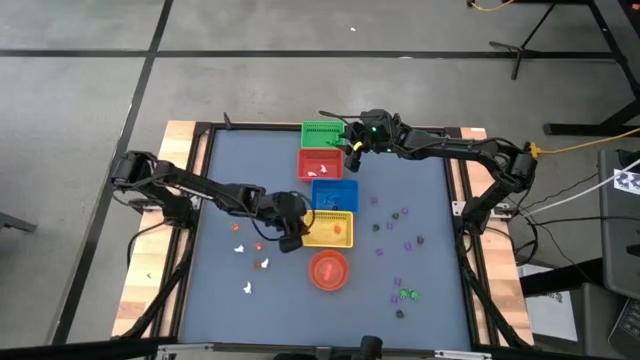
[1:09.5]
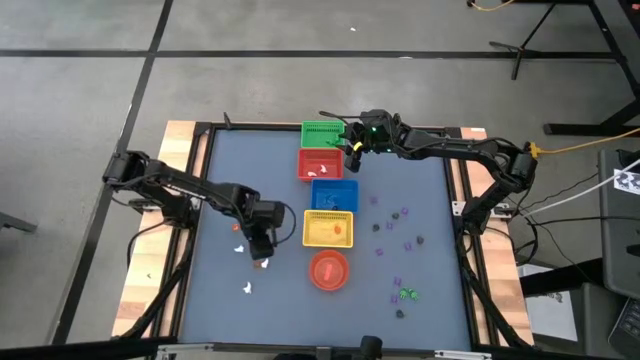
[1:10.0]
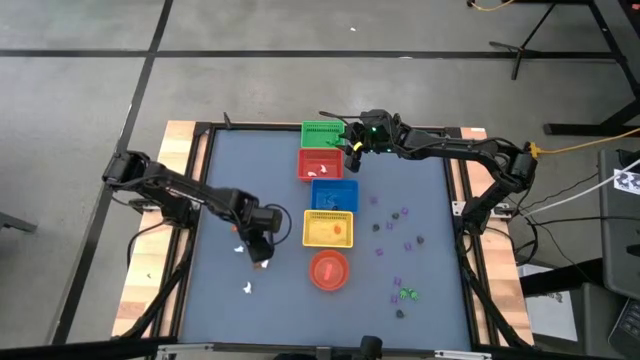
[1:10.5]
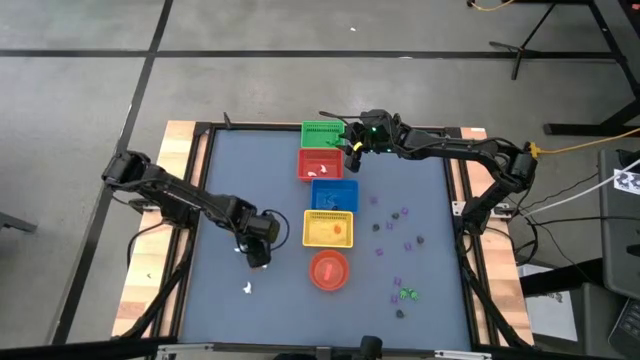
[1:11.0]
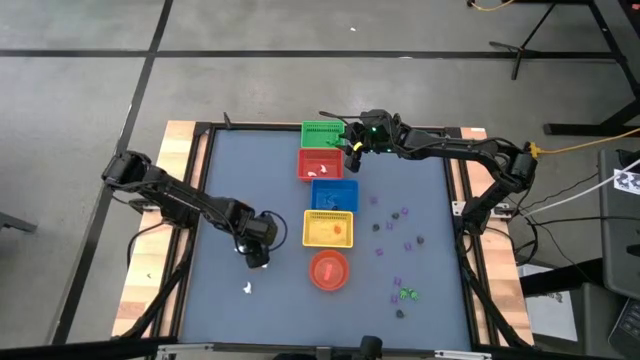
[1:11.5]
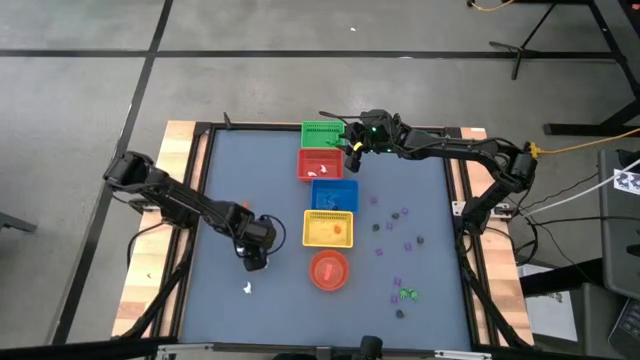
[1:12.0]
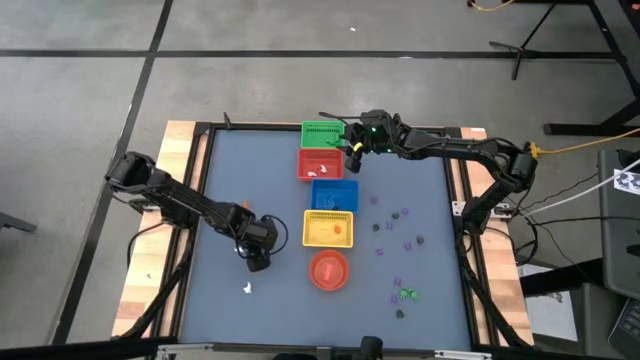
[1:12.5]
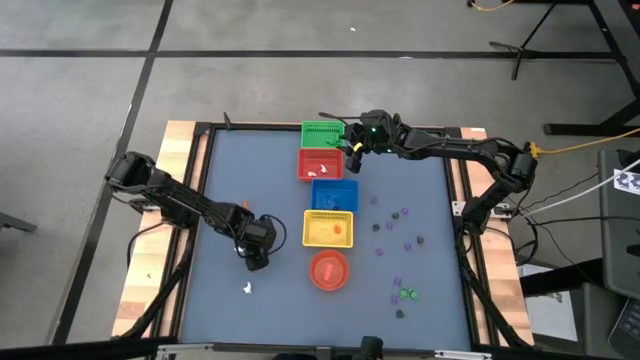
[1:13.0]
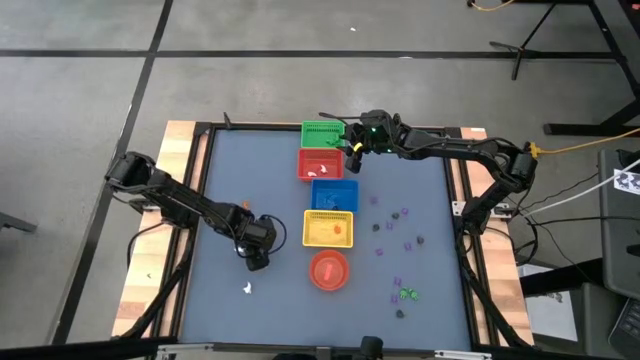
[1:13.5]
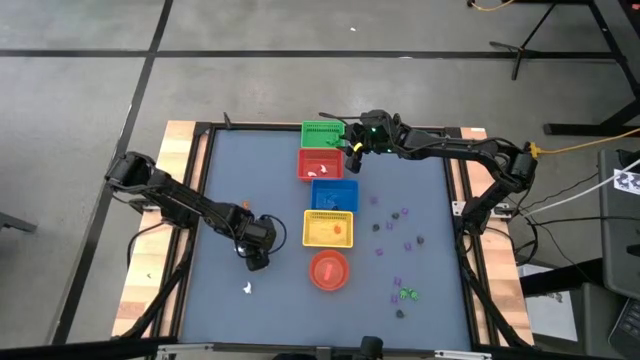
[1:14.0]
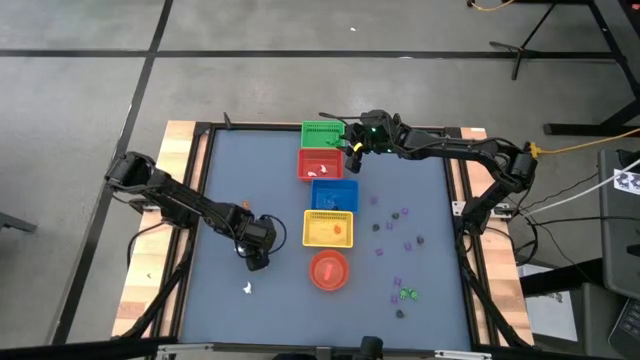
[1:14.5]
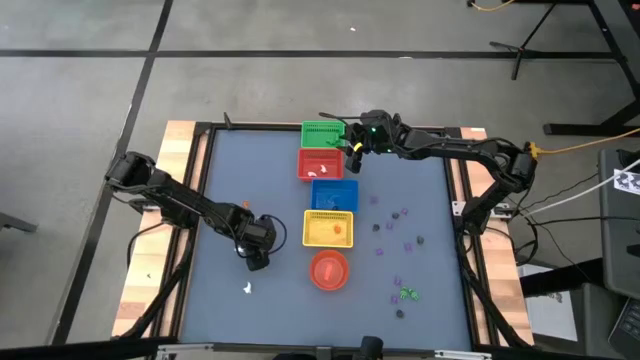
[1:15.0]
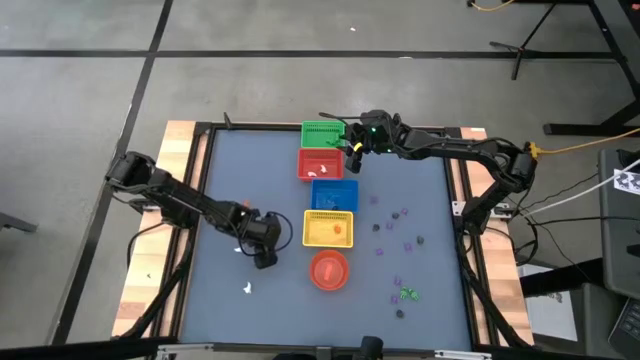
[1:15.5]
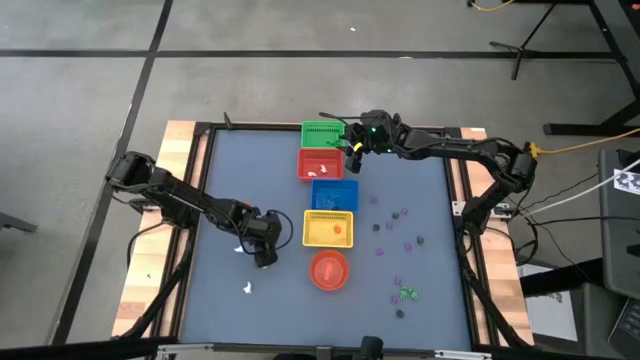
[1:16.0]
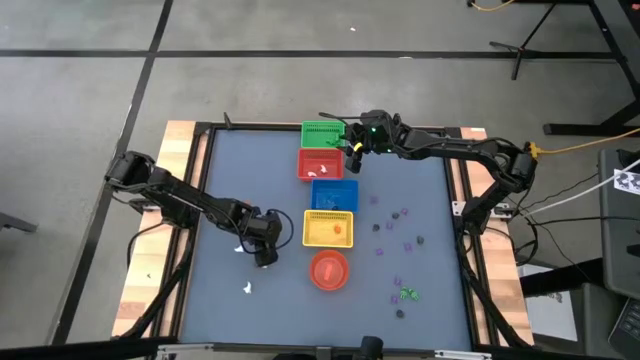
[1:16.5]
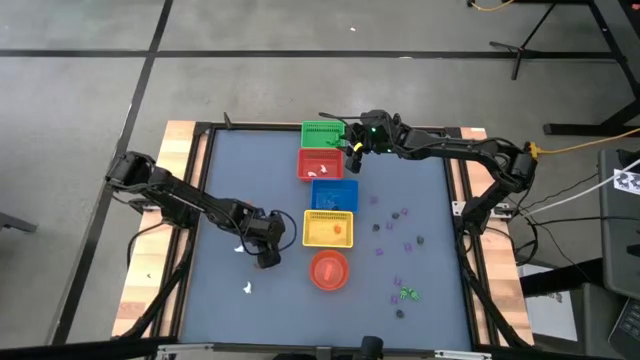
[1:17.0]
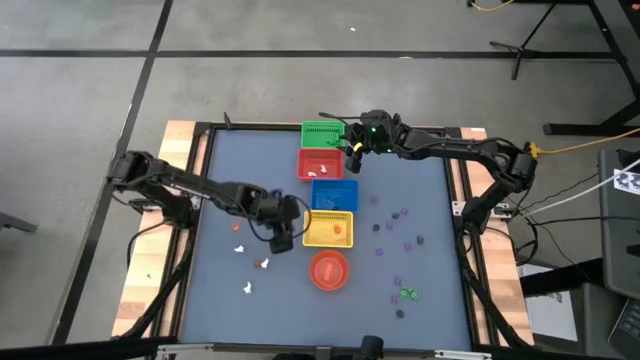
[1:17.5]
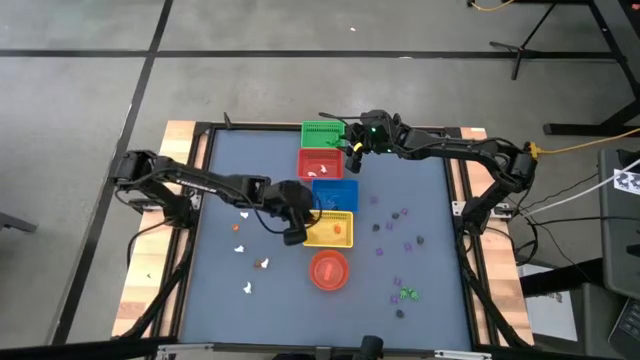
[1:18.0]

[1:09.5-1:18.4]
Task: Sort Halloween decoration
Put the orange pumpkin toy into the yellow bin

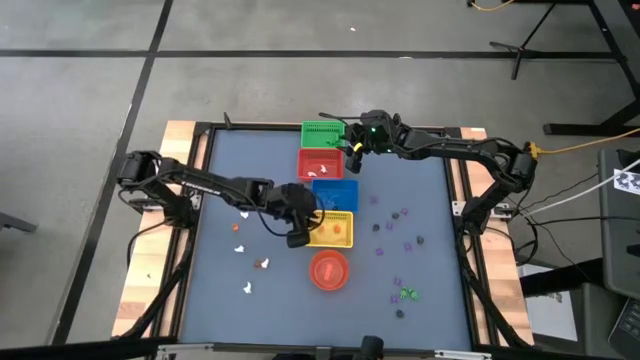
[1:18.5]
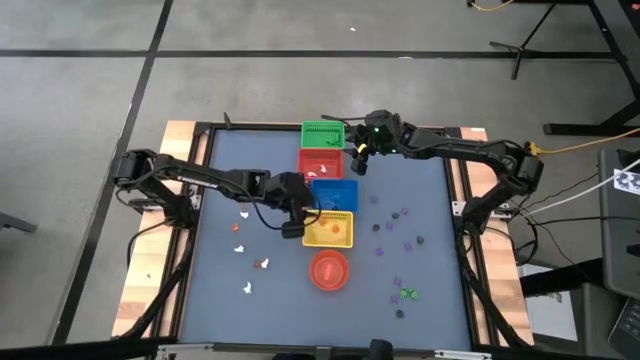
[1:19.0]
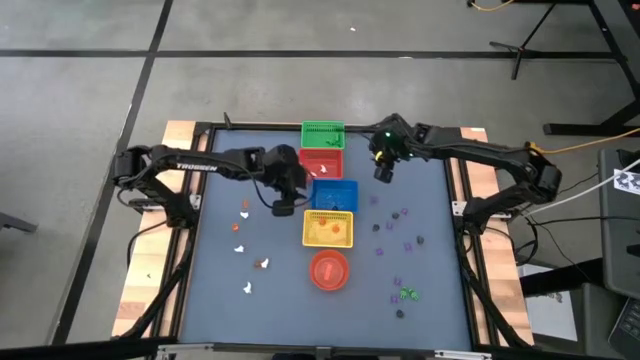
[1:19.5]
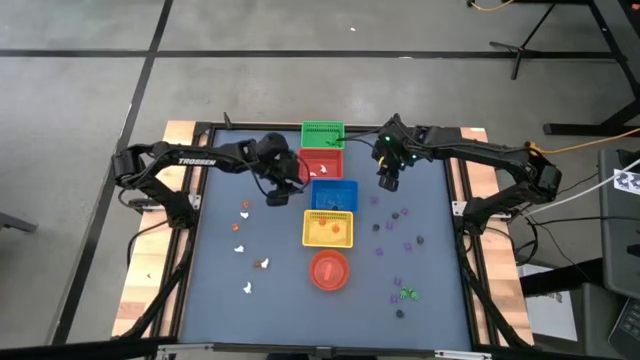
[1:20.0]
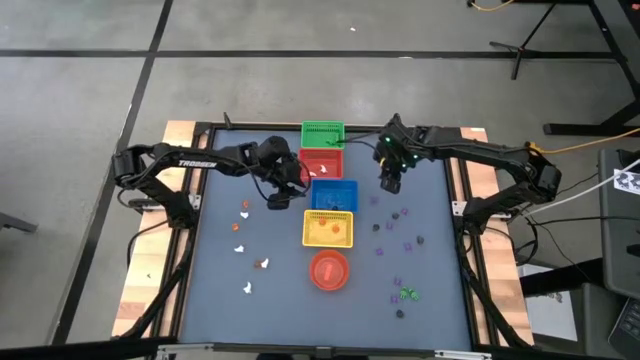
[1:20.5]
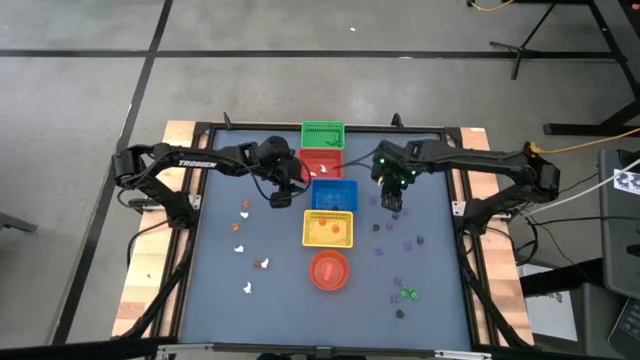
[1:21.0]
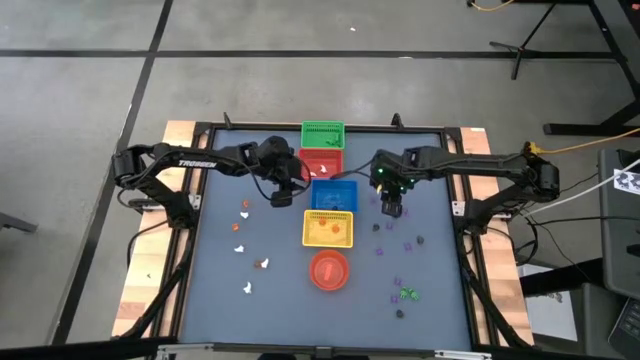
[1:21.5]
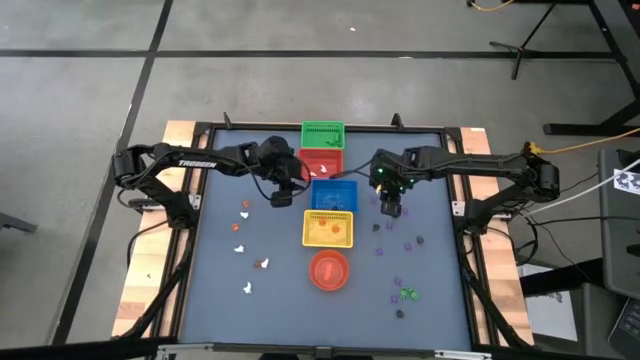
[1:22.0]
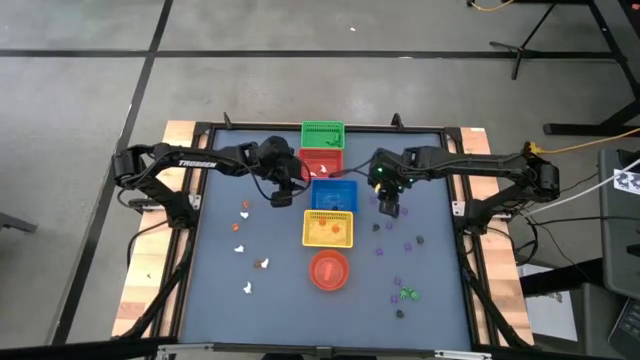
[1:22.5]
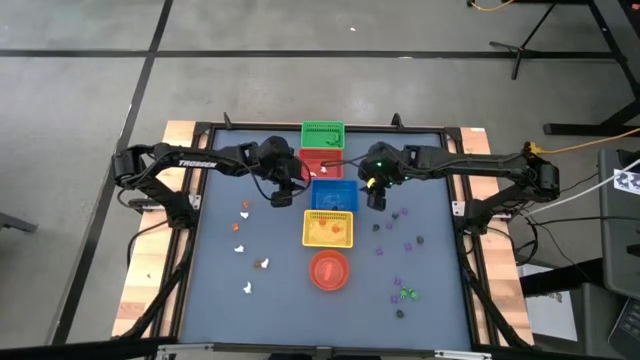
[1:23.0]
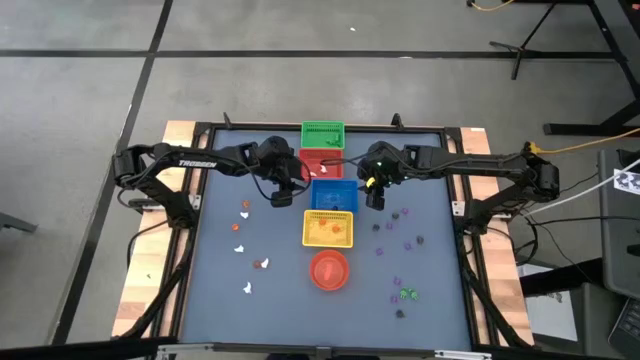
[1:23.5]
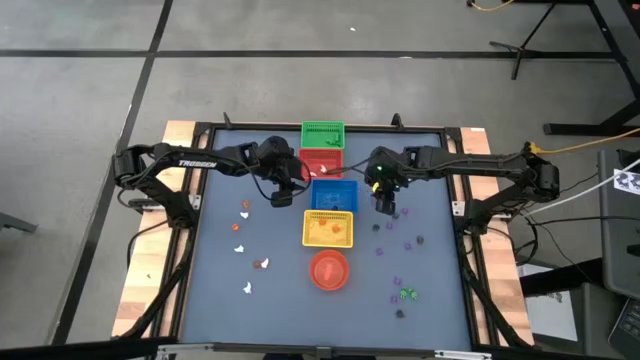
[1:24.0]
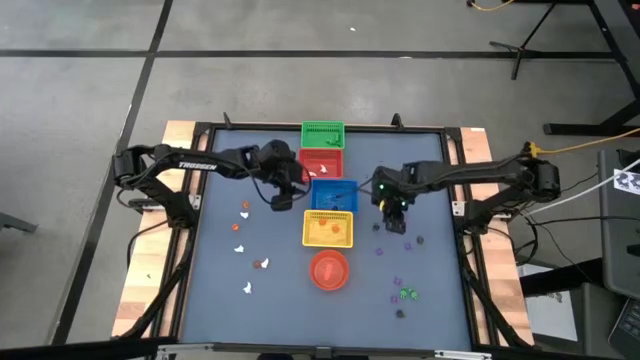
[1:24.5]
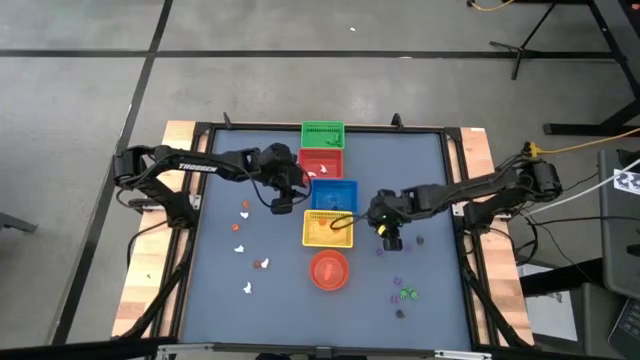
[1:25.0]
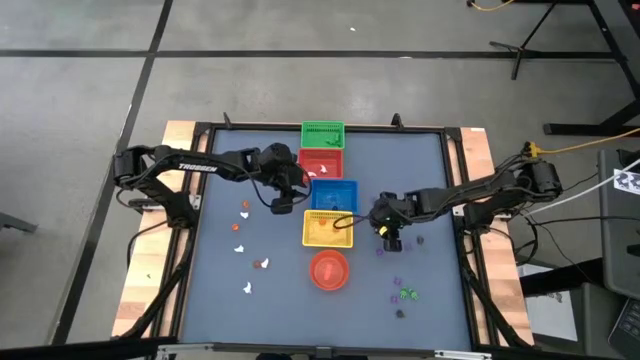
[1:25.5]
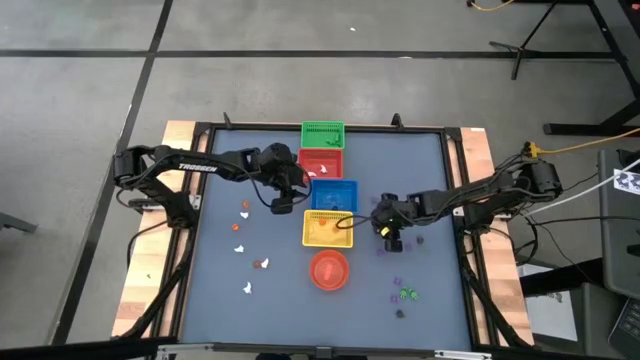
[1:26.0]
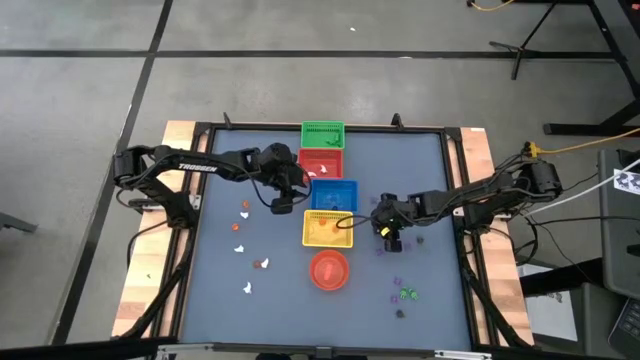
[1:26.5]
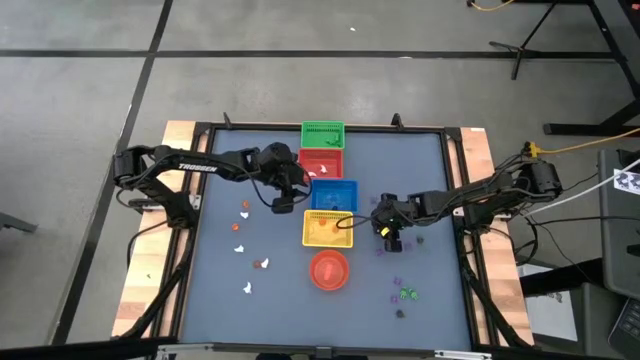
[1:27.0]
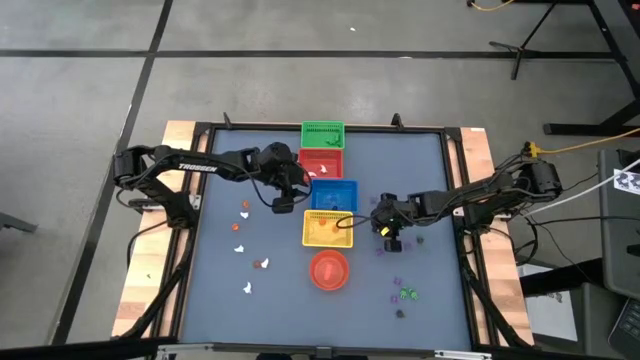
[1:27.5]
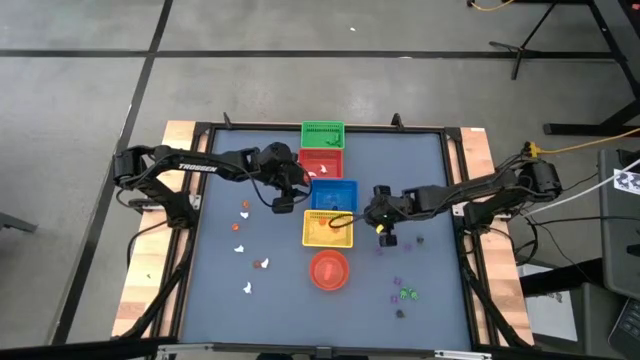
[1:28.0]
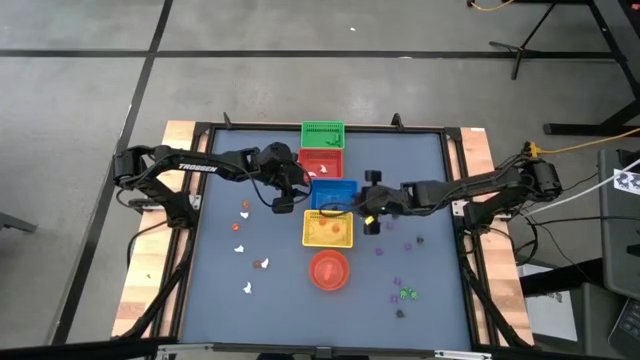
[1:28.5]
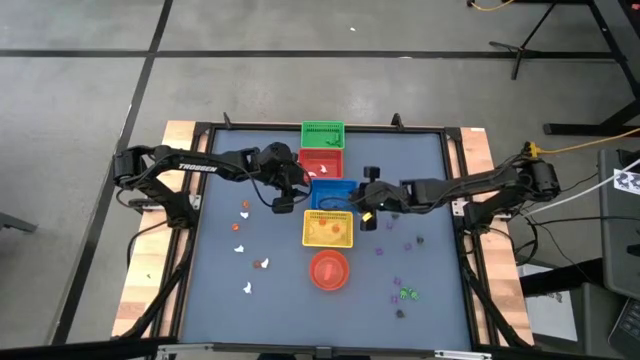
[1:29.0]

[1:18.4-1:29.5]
Put the black skull toy into the blue bin

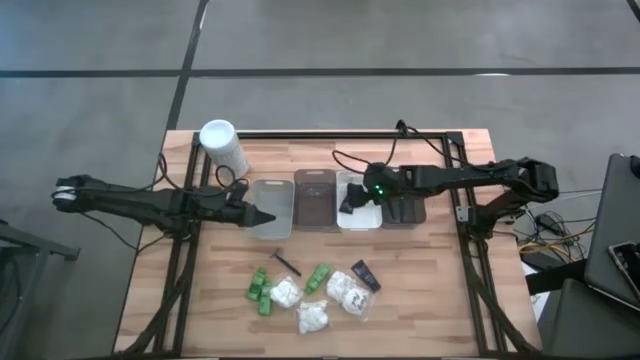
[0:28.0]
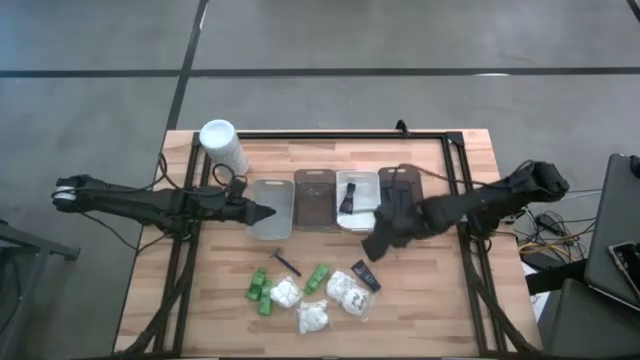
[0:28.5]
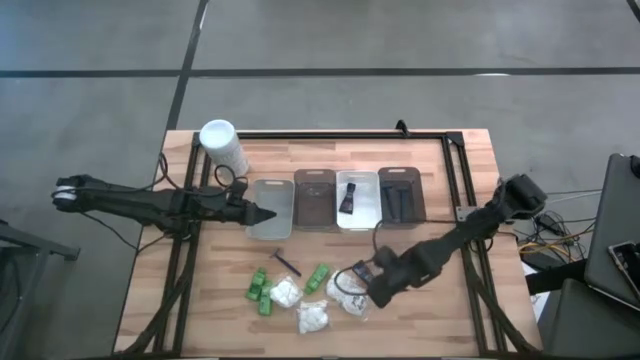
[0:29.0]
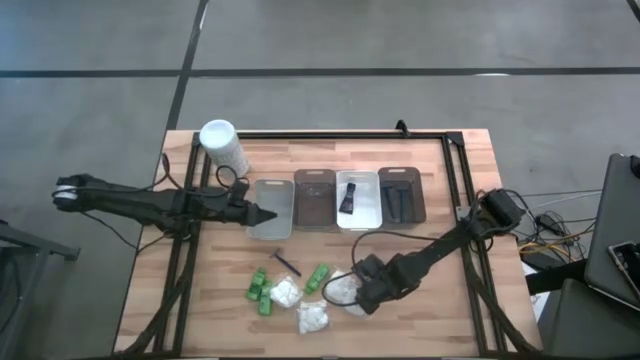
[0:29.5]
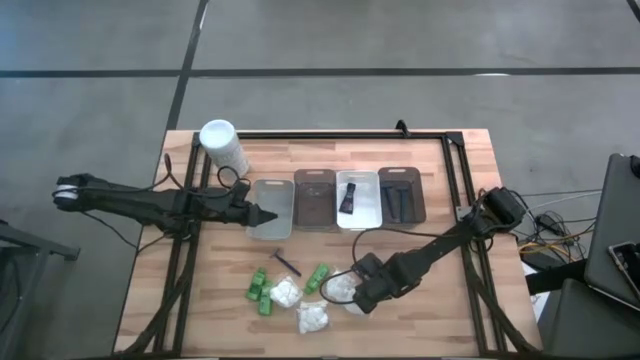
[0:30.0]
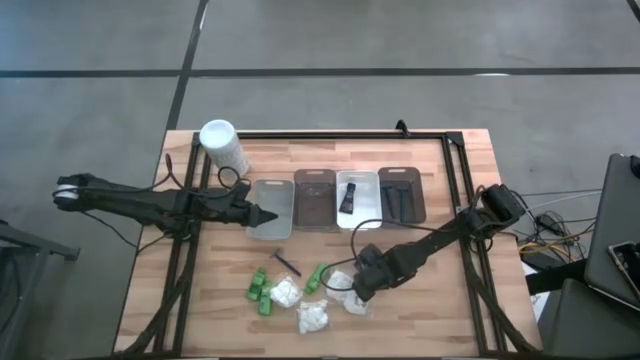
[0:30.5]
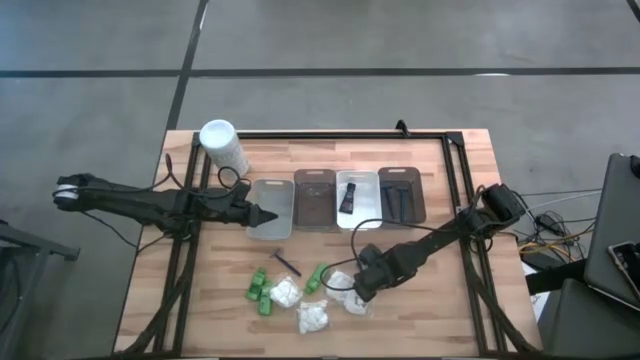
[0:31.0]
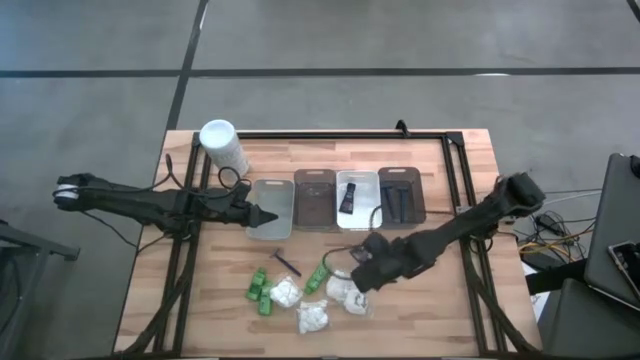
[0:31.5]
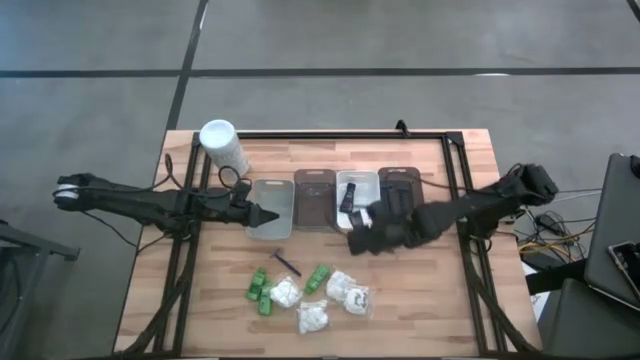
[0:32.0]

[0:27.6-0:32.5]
Task: Pick & Place Travel size toiletries
Put the dark blue shaving cream into the white bin
